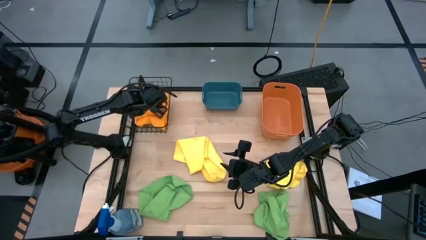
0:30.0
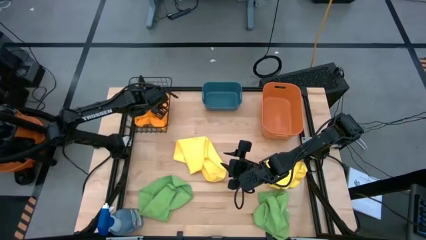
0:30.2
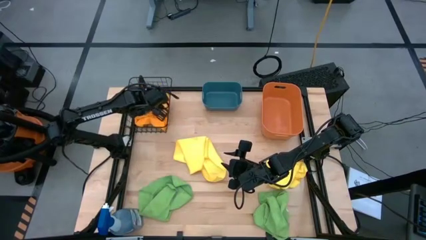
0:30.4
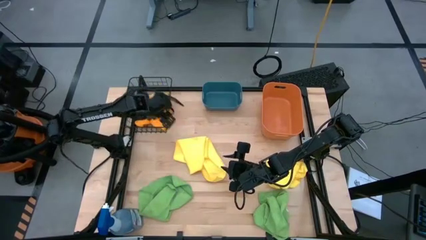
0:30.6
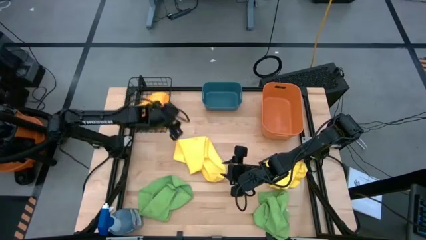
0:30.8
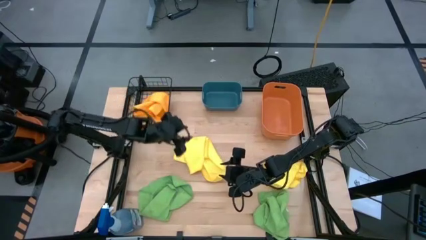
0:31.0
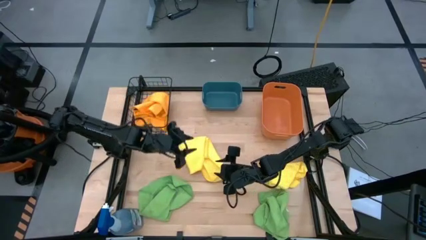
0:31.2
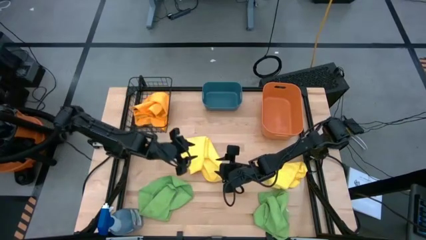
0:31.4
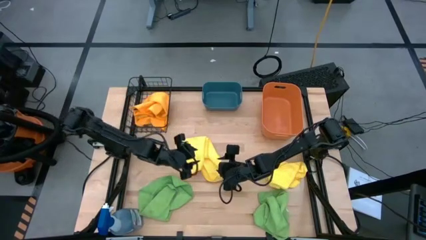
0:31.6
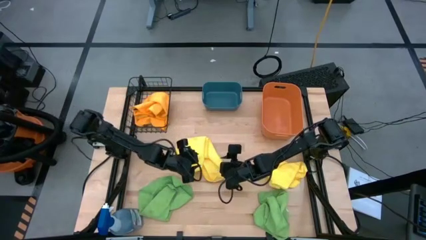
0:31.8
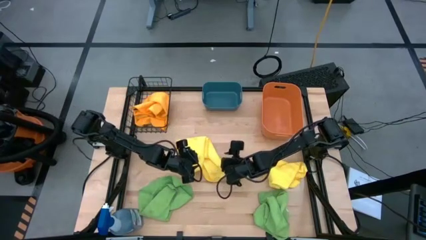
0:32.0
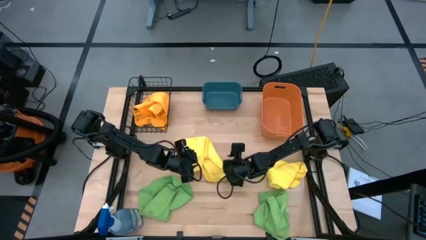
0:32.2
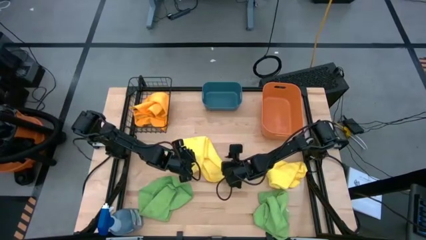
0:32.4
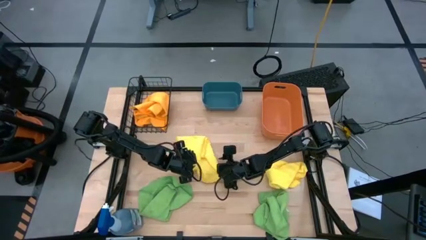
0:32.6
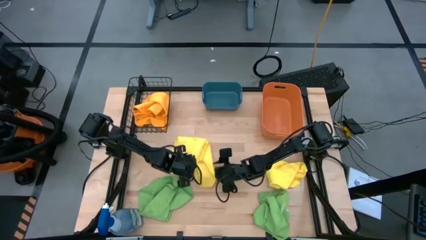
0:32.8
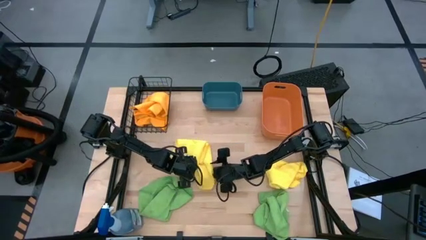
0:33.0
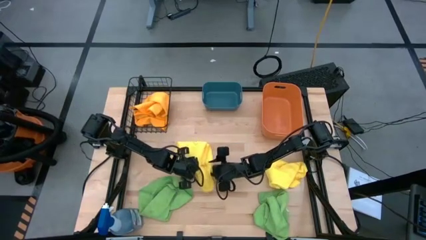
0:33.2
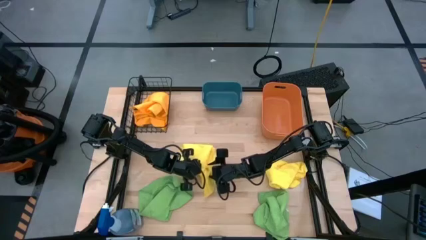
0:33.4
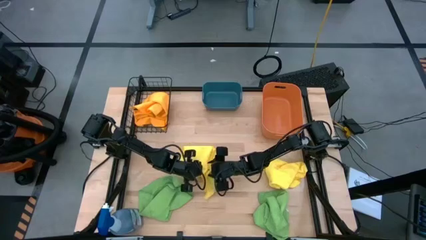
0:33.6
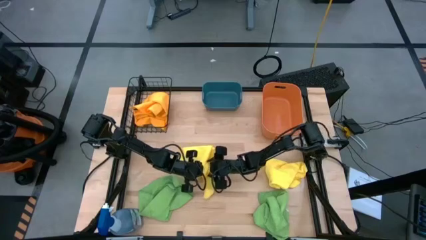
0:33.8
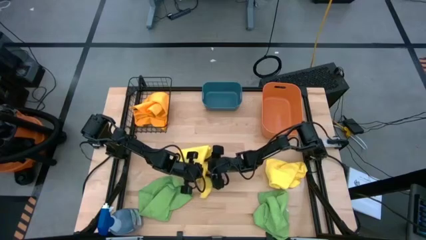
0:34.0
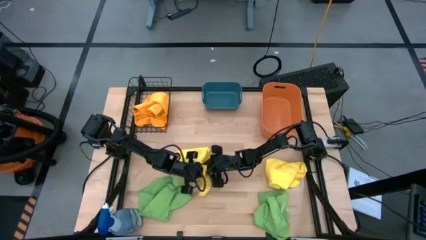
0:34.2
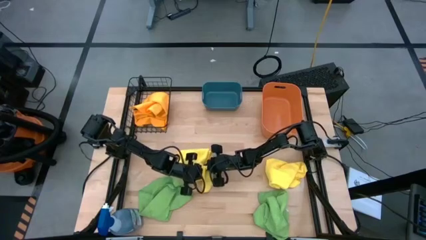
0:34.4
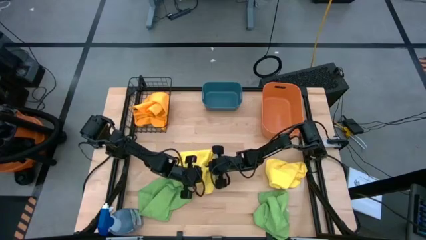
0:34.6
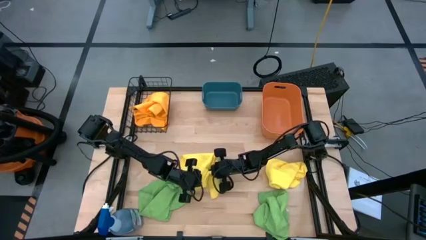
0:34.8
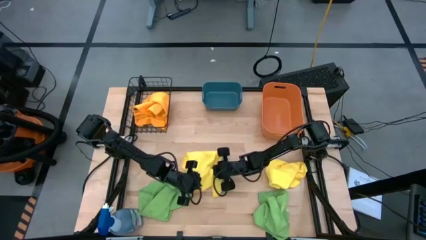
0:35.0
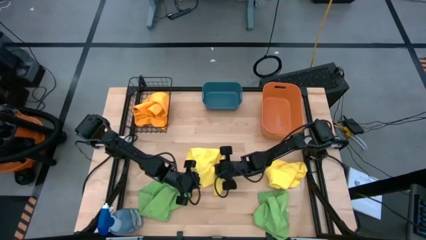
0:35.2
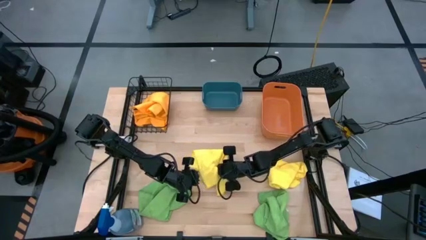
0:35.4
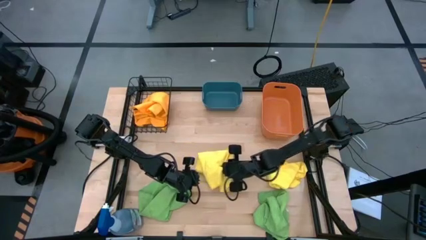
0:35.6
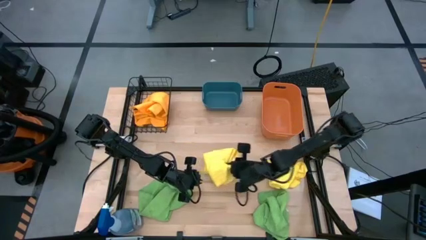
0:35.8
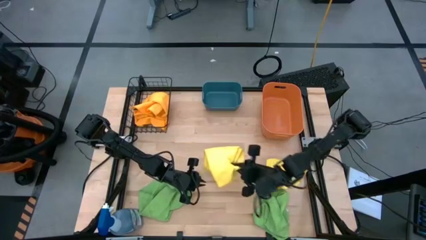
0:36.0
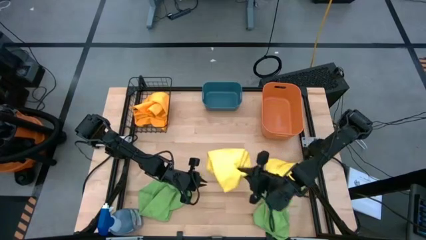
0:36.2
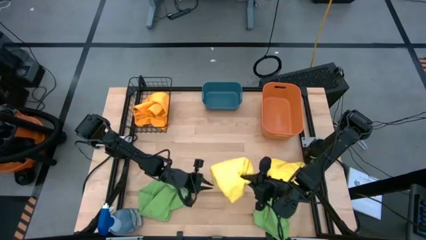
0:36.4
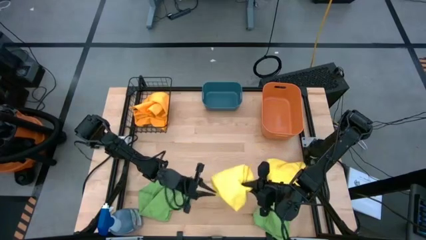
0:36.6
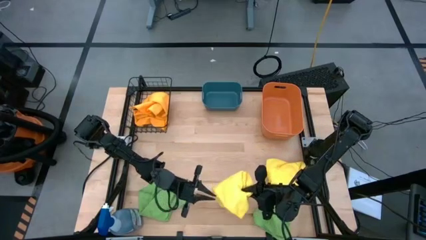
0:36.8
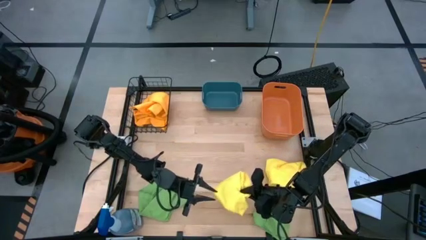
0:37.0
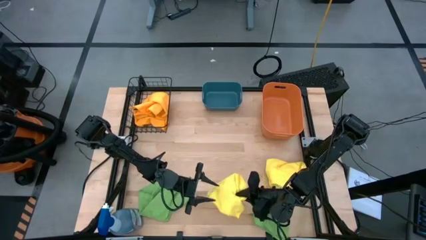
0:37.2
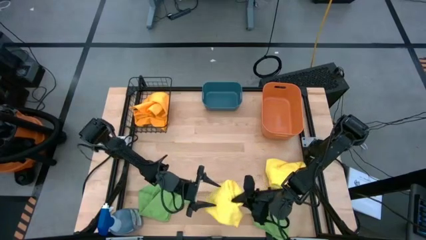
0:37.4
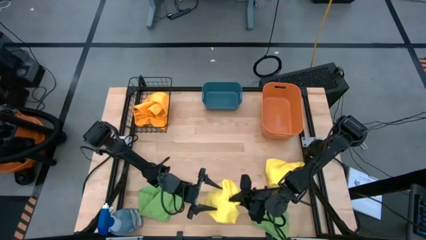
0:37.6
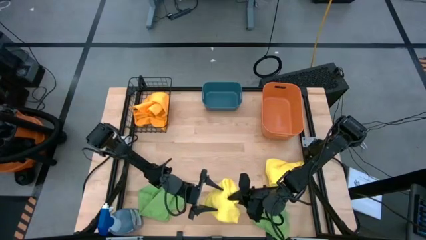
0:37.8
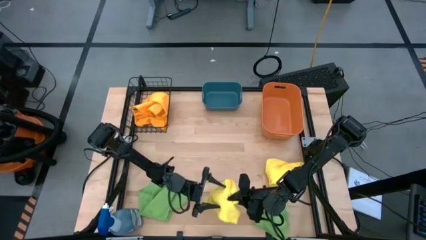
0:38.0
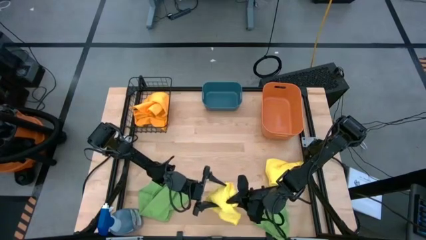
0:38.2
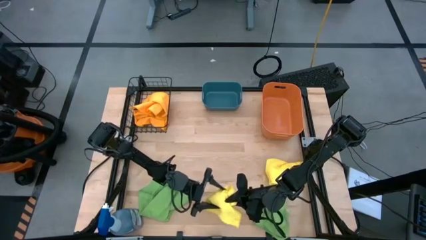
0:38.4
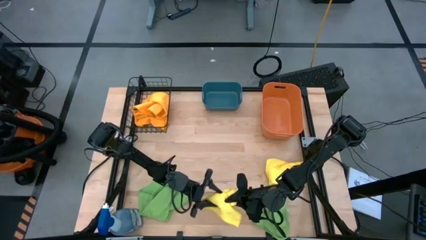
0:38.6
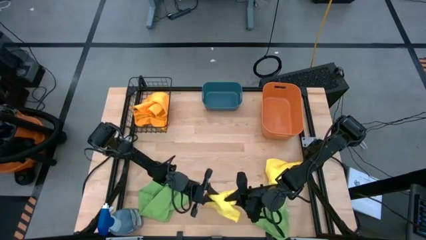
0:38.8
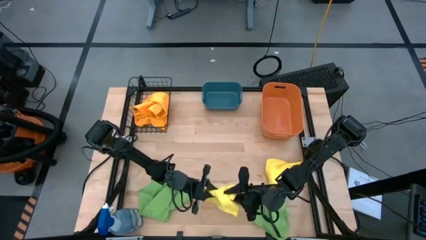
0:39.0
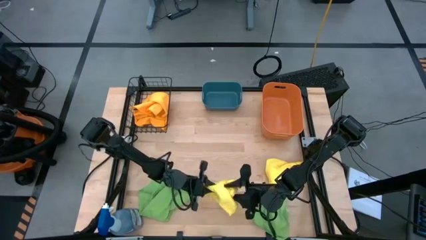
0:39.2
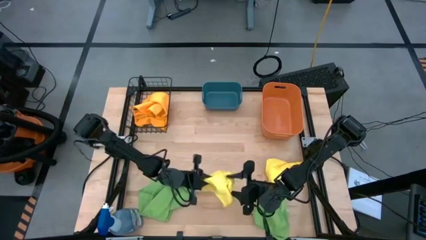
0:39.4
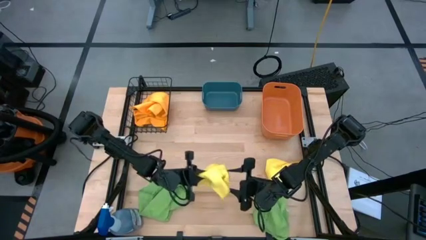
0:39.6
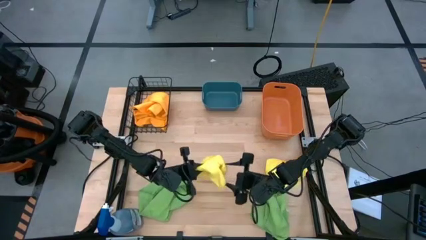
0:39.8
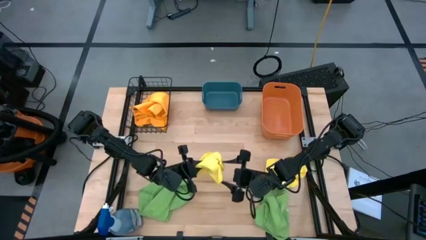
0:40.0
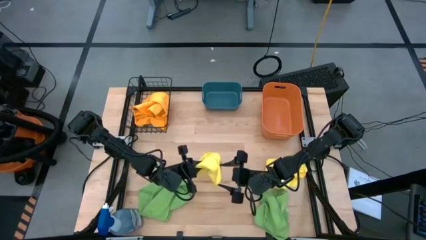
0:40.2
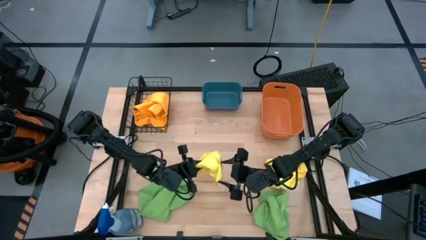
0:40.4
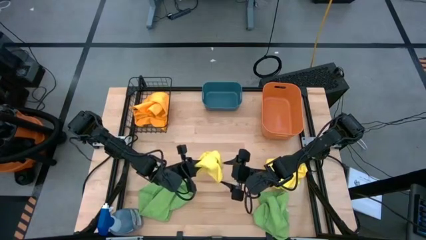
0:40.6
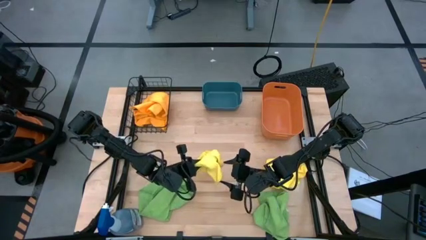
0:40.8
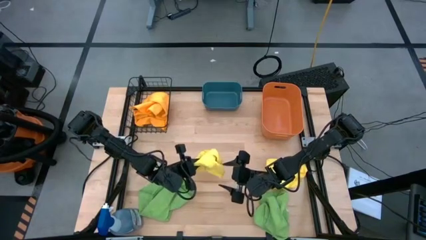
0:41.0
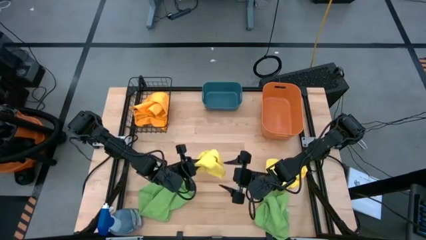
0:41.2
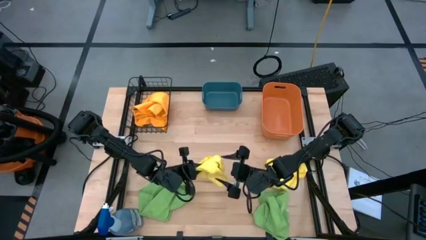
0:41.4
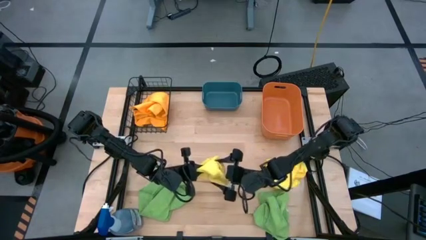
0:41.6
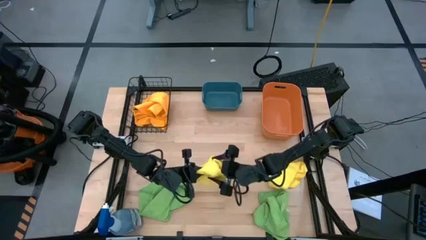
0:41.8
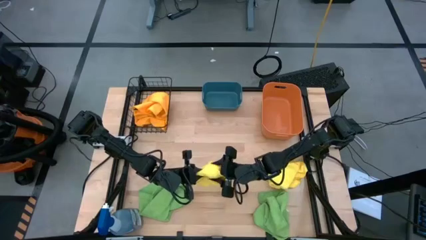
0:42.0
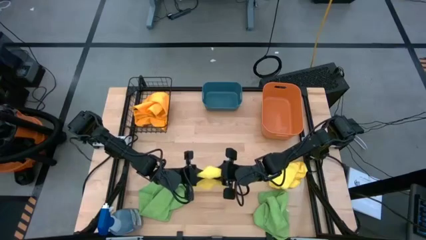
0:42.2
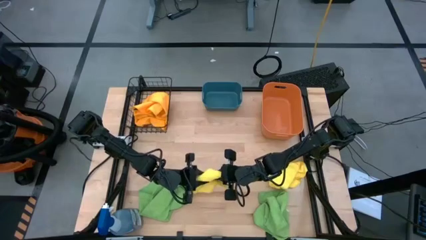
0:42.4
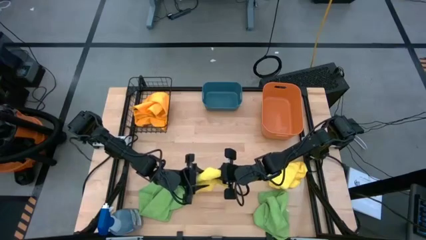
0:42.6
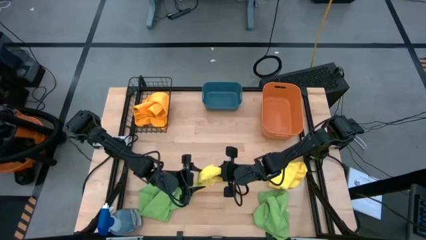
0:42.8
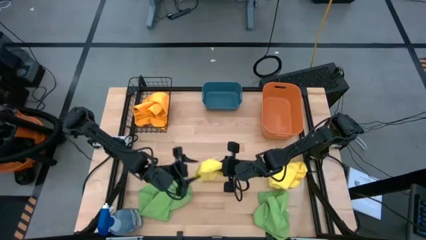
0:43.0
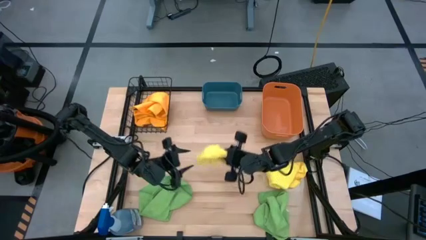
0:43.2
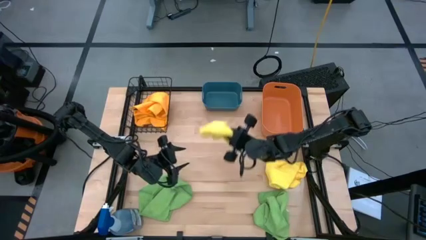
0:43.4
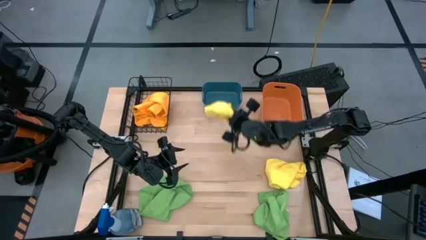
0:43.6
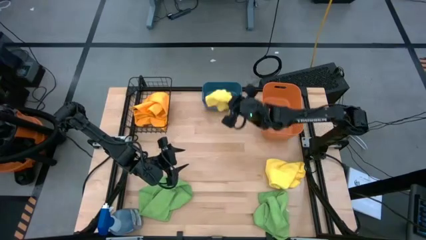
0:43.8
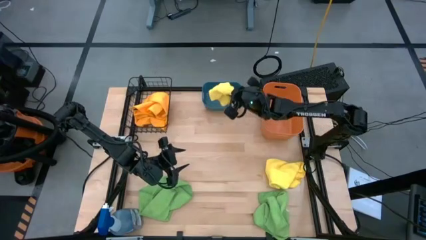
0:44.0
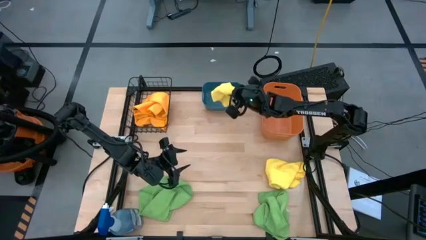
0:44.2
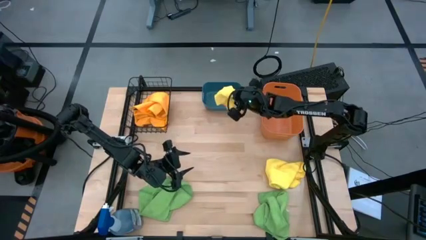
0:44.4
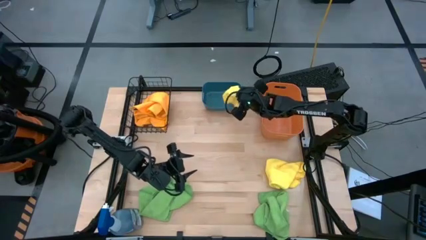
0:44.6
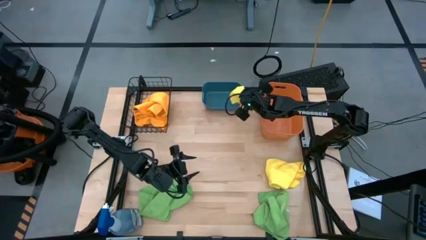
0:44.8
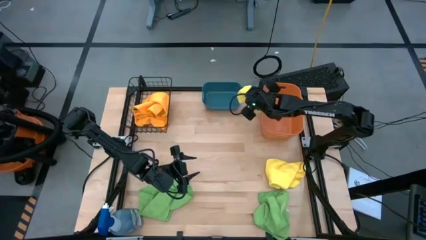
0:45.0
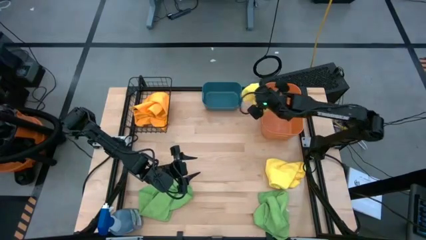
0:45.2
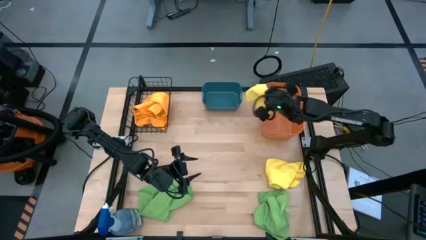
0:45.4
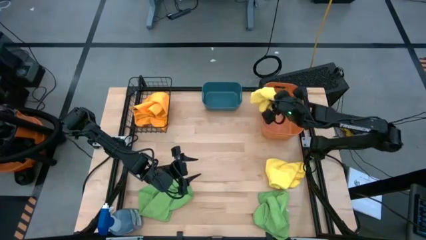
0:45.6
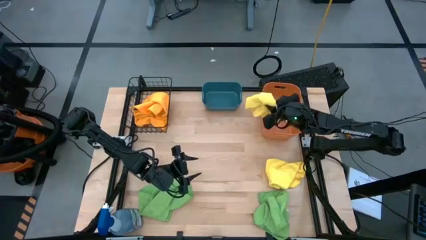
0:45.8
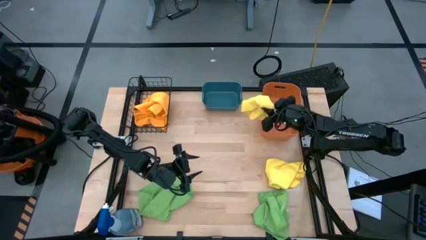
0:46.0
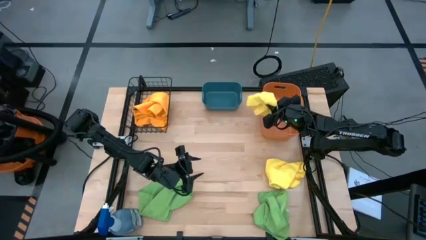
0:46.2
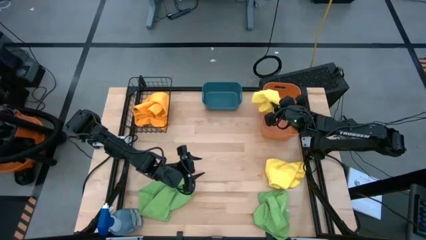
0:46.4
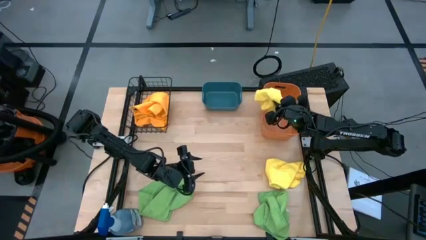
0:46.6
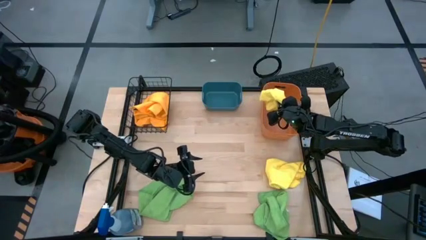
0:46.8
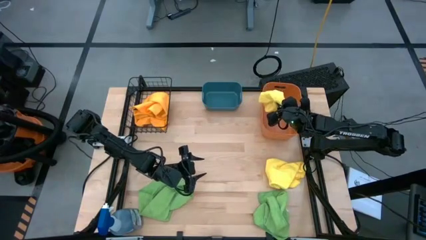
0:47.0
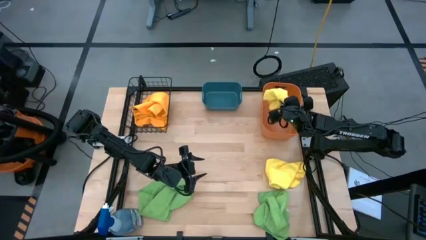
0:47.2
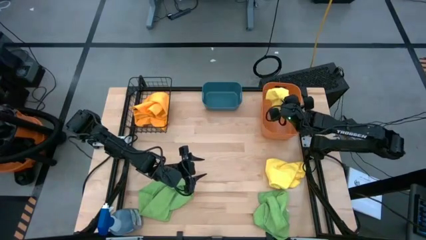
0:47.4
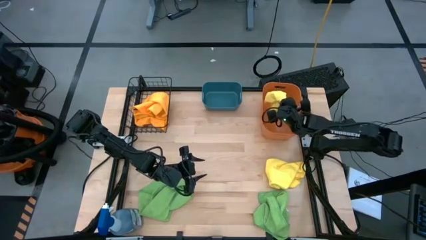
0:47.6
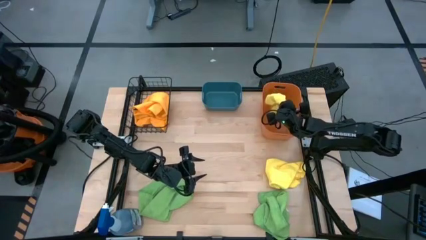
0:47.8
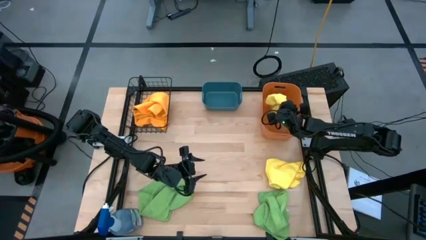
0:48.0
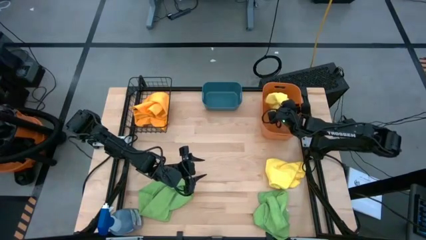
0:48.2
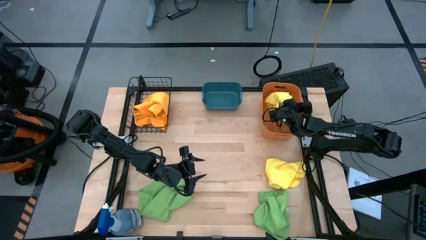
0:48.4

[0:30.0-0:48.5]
Task: Sort microfiber towel by color & place in baskets
Put the left yellow microfiber cloth into the orange bin
